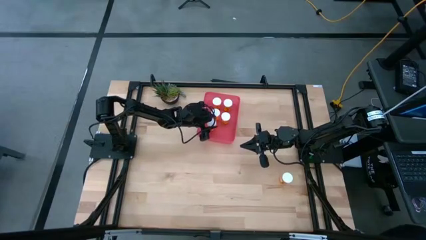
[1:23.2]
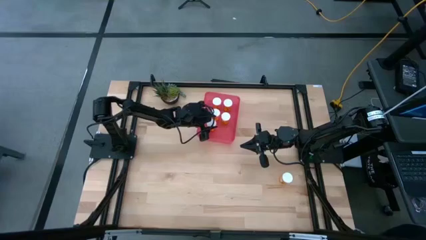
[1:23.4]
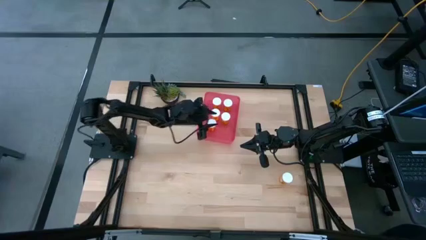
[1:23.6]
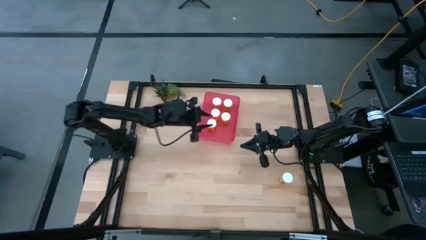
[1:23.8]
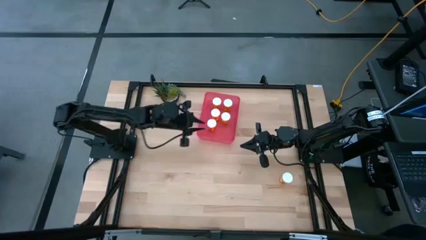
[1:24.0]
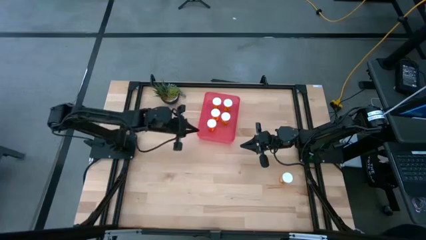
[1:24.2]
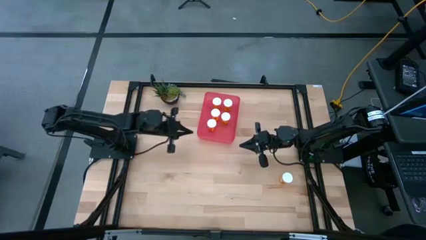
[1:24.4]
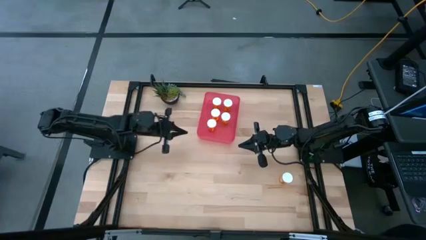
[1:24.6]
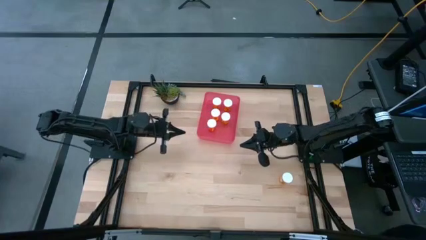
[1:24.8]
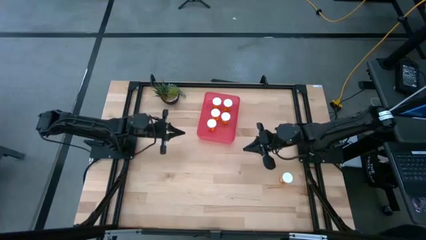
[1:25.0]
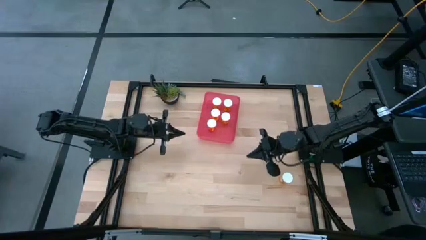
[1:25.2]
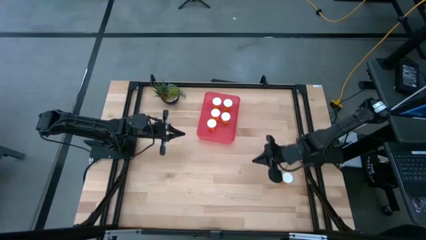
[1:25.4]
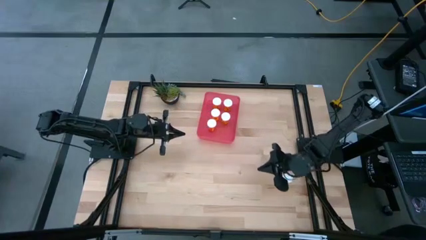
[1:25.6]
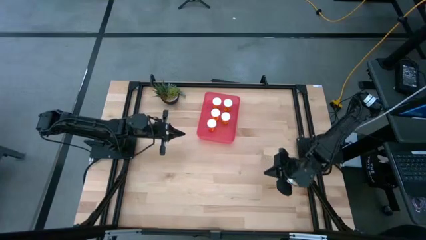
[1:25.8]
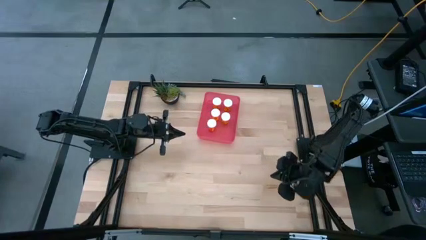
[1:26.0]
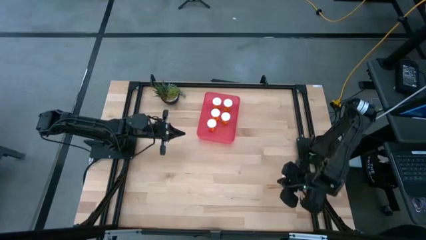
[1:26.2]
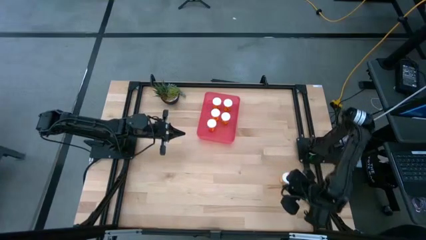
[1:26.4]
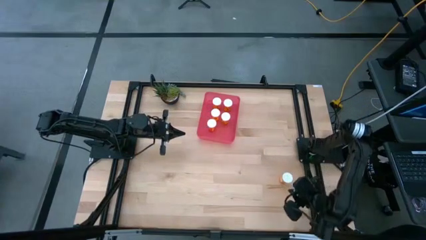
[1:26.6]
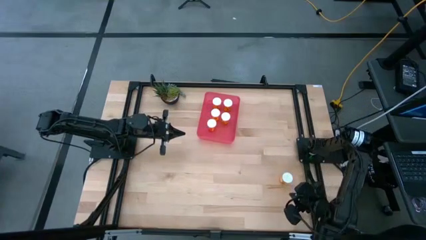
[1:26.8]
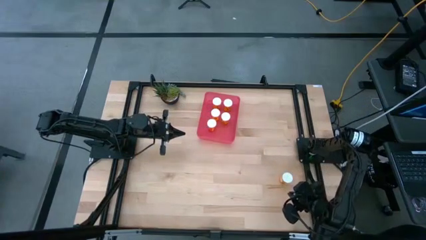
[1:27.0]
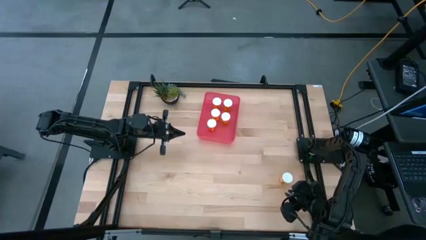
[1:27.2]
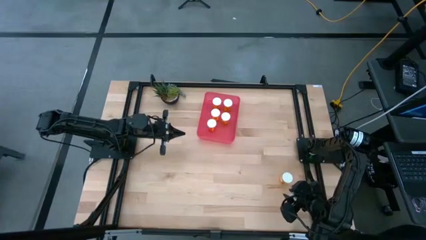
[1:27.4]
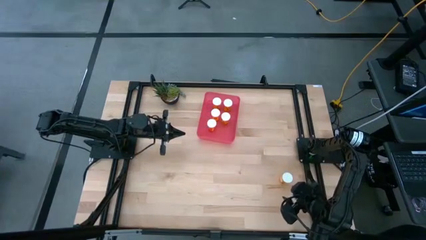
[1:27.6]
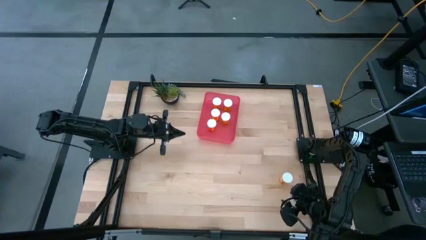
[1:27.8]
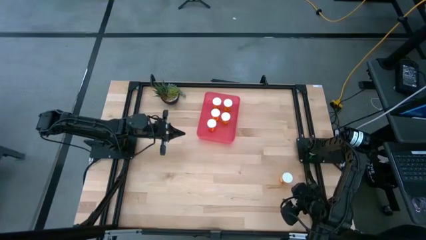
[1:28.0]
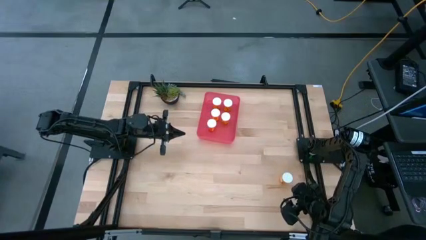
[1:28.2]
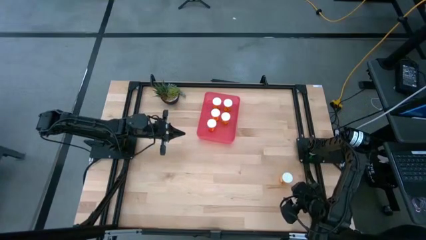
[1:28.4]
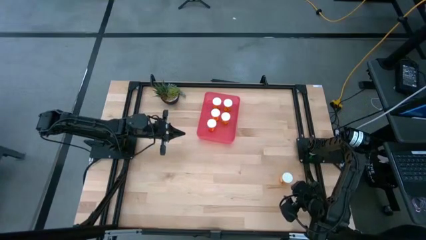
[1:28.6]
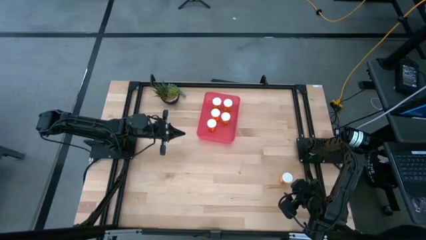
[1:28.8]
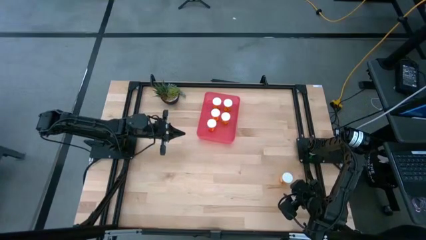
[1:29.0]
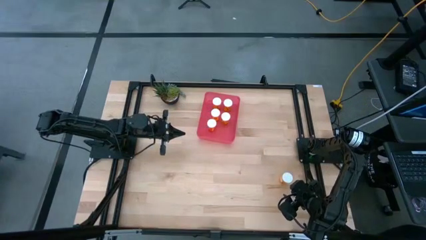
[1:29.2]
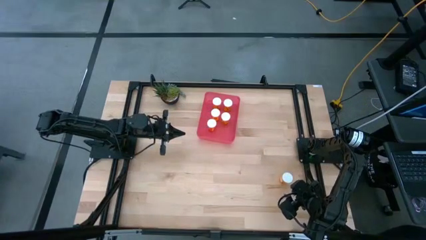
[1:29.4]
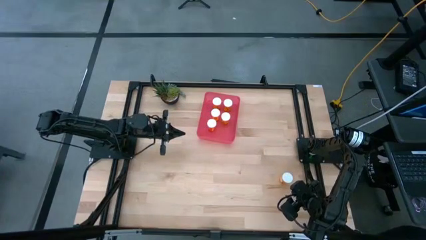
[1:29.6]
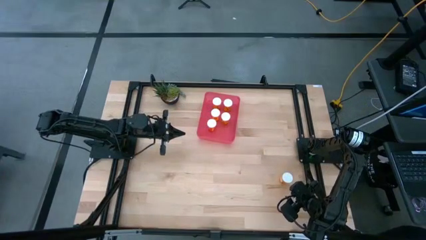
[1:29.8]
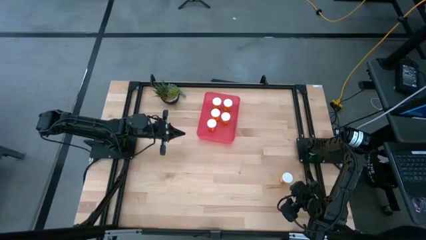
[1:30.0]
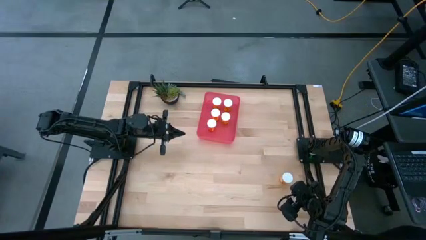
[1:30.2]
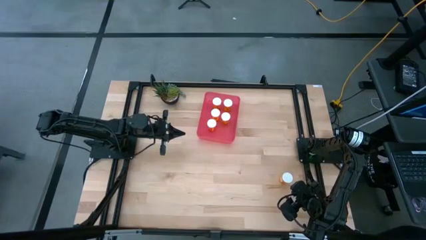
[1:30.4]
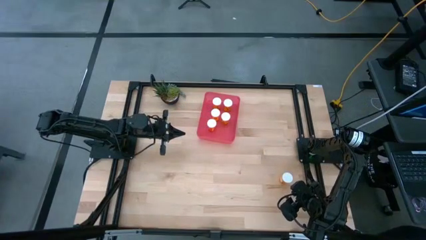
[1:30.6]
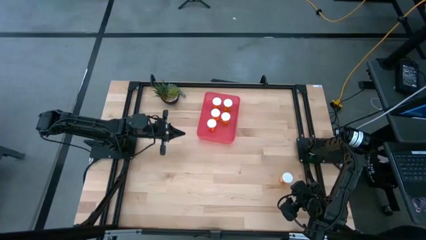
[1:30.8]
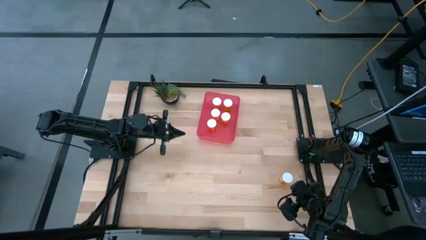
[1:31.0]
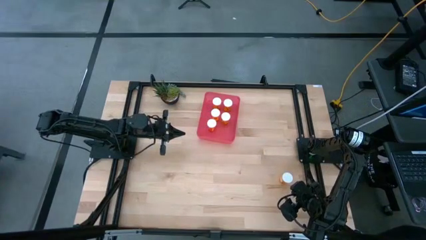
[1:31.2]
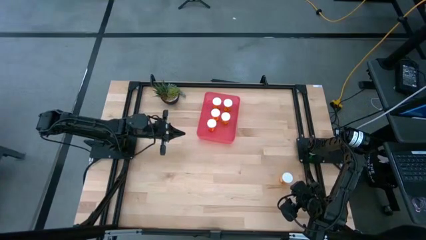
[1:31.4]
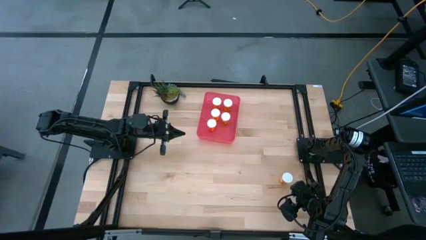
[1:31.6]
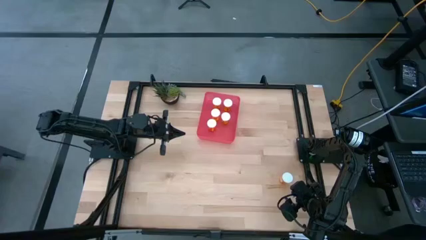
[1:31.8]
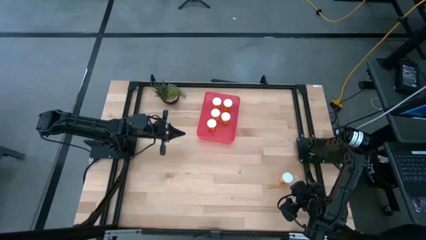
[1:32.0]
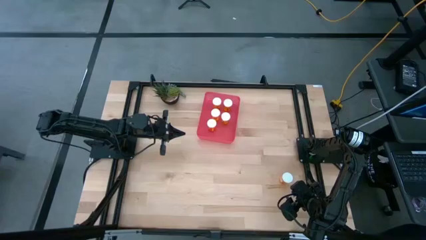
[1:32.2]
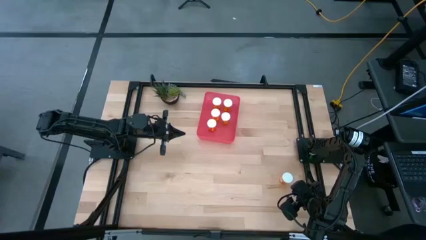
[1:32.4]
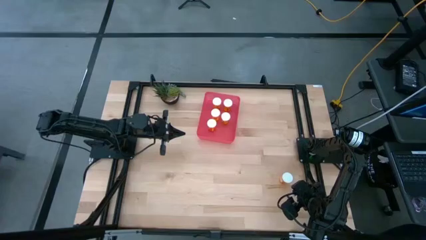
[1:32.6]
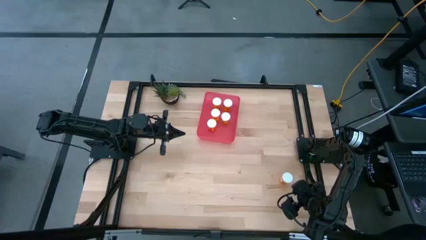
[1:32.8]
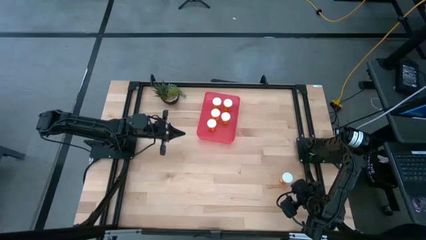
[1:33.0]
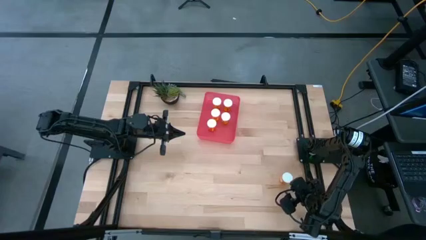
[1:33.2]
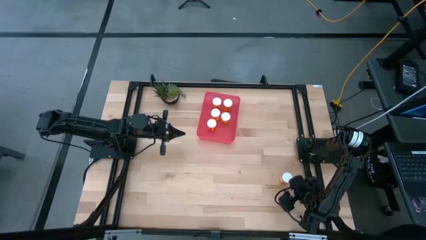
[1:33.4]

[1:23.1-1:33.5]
Task: Pick and place pill bottles into a basket
Put the orange pill bottle into the red bin

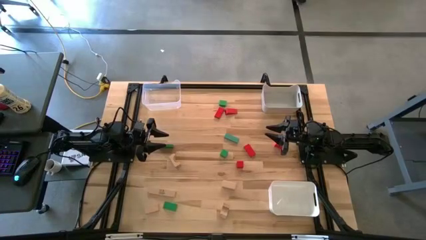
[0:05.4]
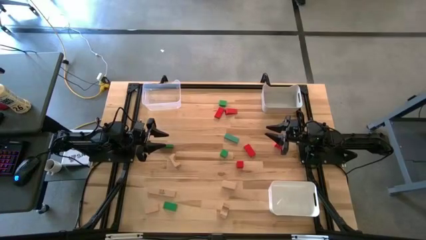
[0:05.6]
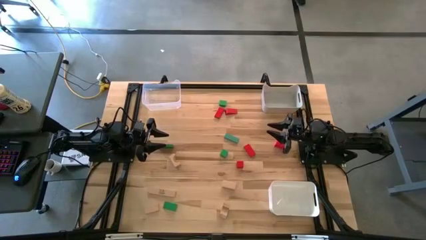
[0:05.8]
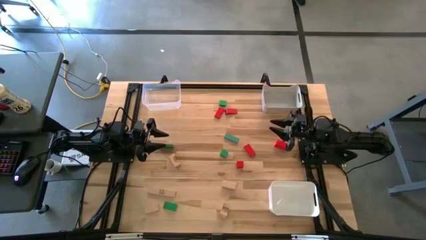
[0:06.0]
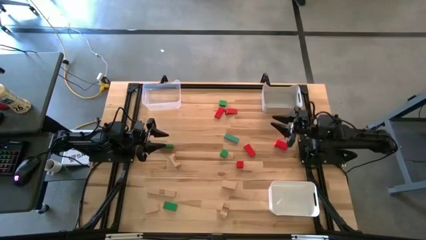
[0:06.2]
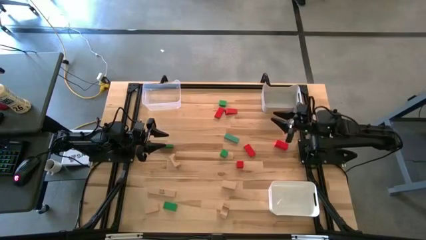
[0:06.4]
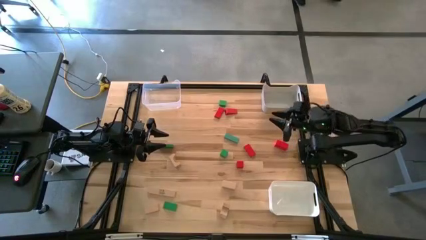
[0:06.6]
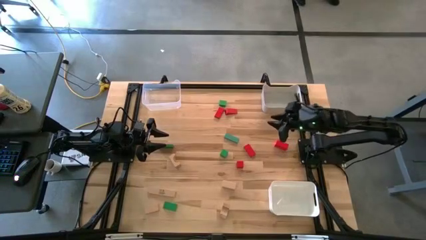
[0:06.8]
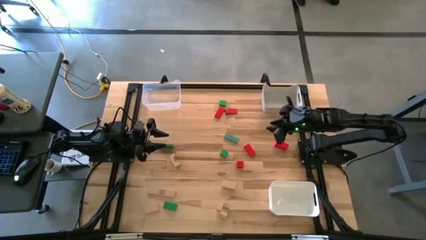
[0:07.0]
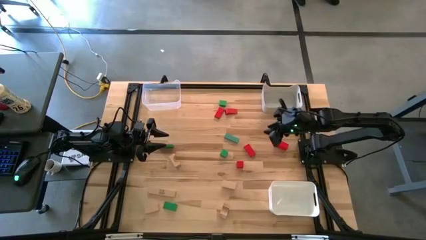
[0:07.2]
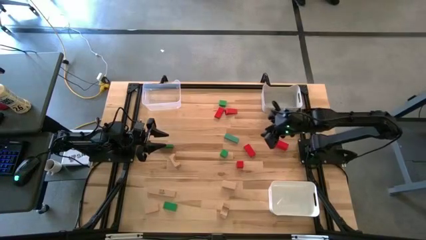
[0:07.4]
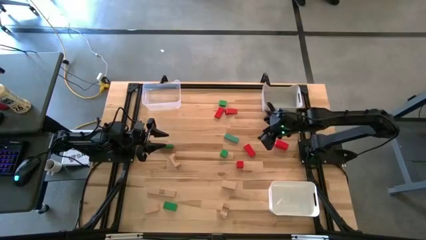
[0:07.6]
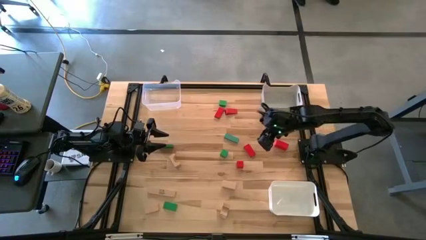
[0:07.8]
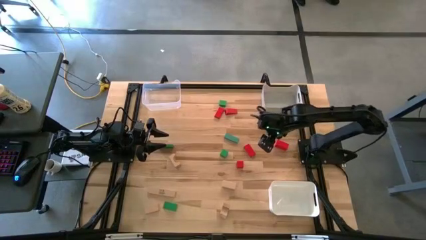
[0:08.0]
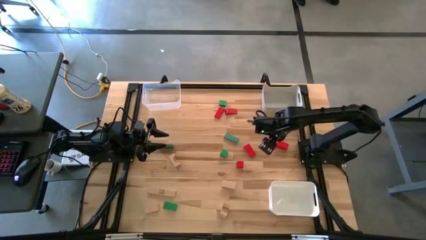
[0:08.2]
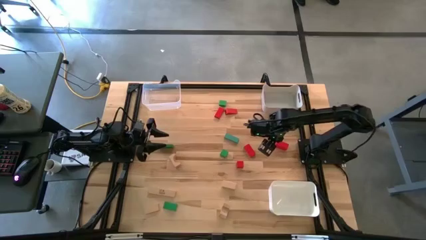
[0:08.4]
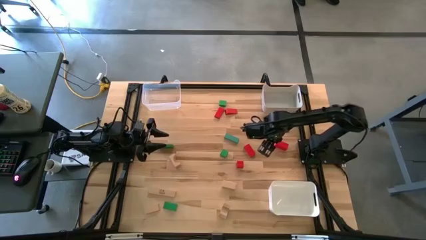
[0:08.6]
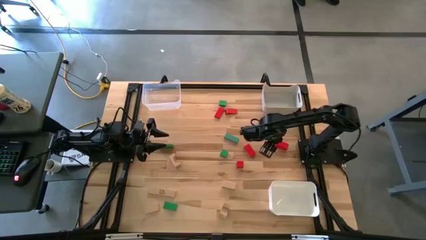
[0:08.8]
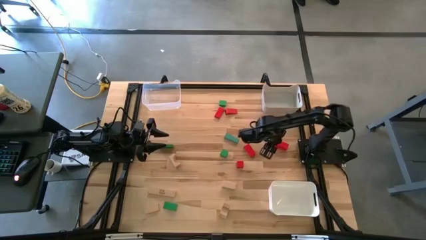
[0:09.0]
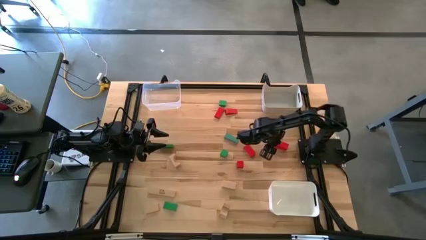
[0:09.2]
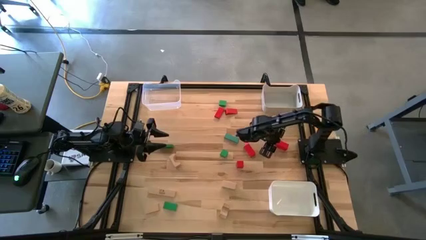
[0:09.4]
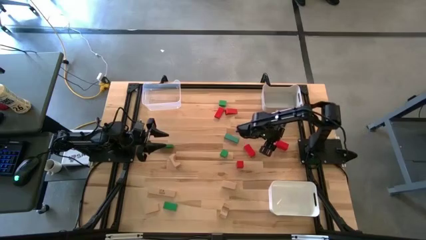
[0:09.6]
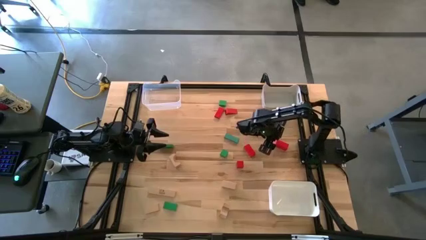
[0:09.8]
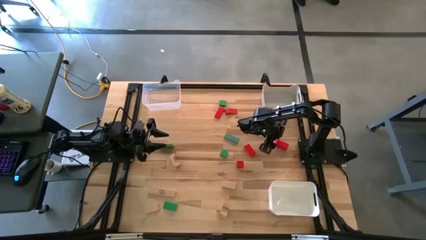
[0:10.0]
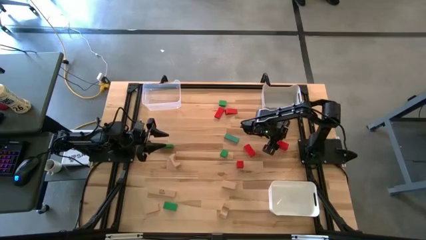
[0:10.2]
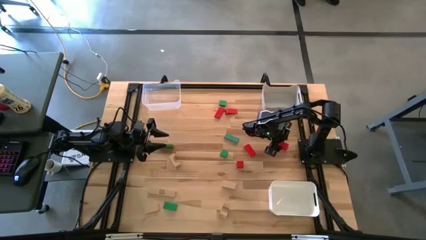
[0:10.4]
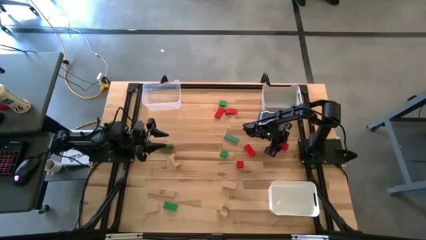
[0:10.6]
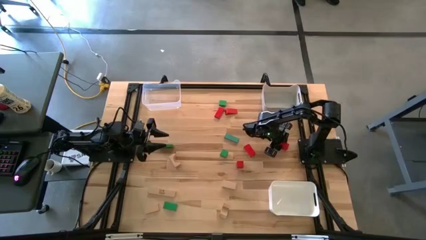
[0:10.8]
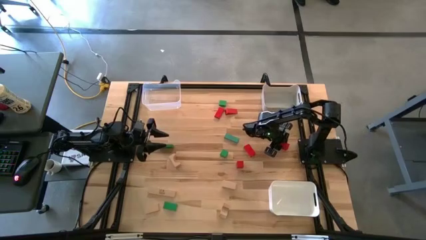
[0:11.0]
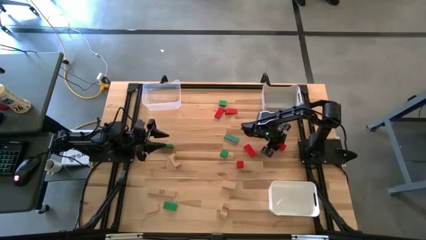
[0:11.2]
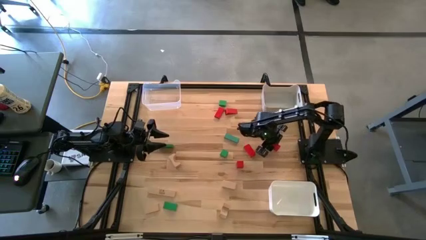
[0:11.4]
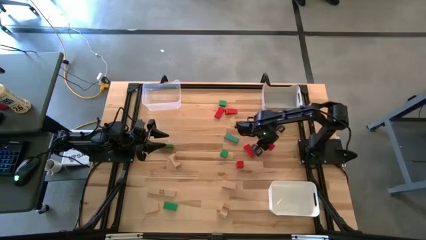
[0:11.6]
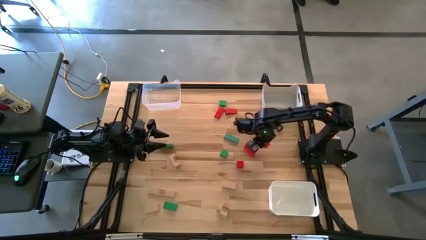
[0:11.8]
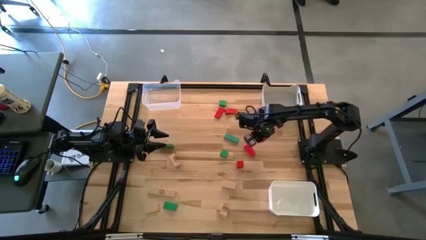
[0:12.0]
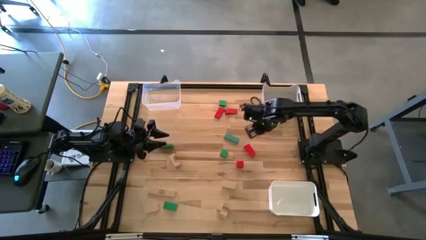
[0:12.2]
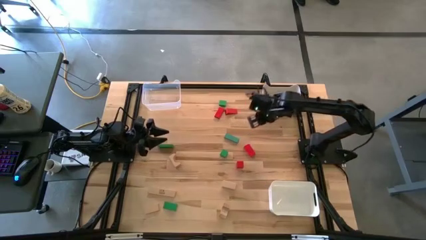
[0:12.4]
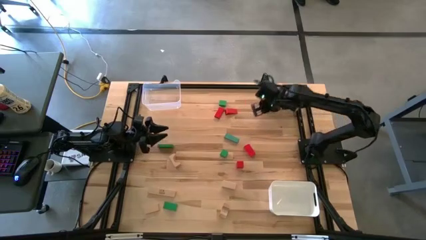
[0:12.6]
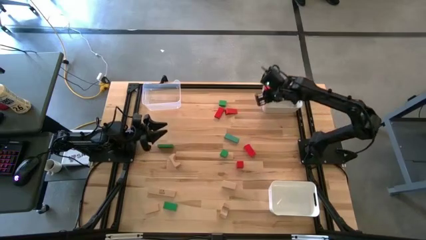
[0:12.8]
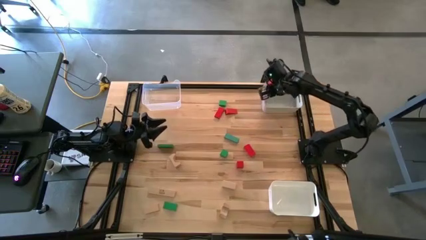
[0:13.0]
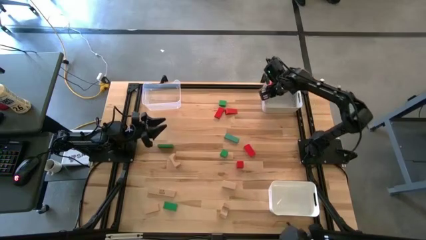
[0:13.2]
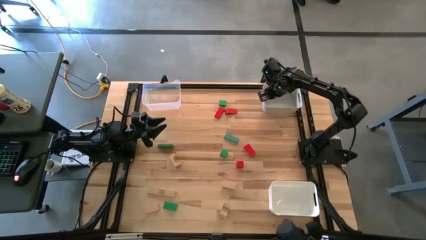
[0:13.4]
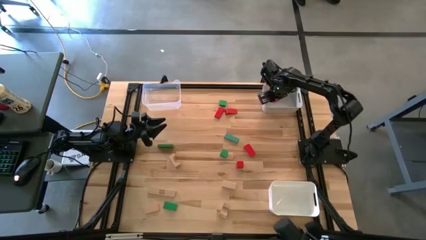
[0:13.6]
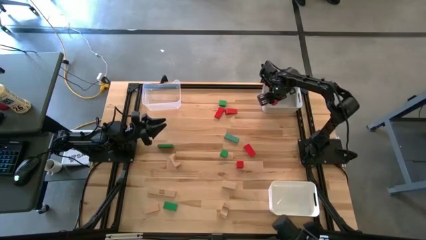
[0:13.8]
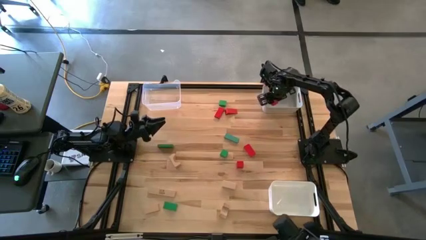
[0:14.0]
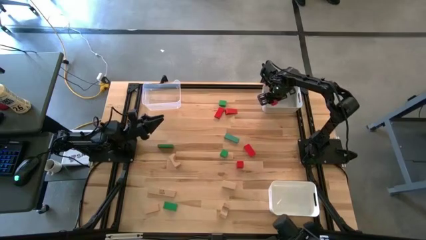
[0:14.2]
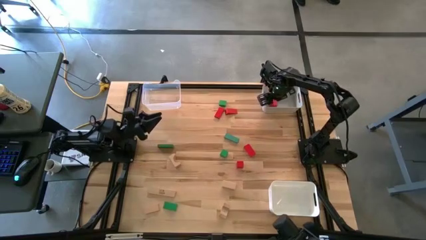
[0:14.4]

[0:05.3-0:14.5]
Task: Sort & place blocks by color
Put the red block into the gray bin
